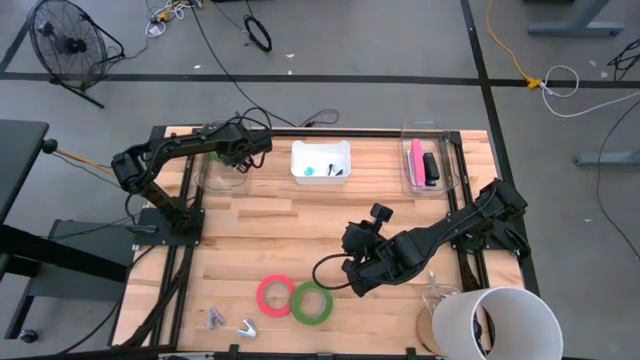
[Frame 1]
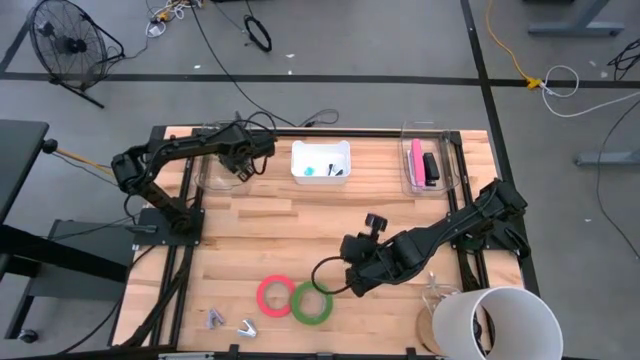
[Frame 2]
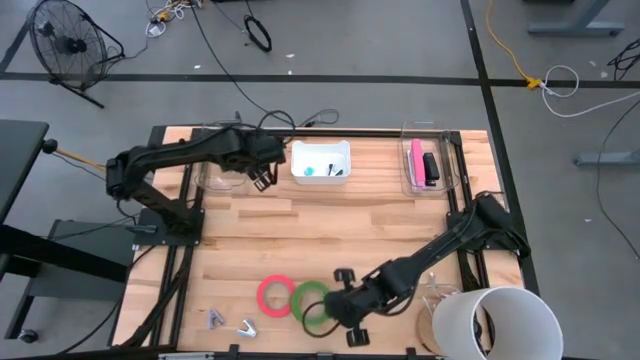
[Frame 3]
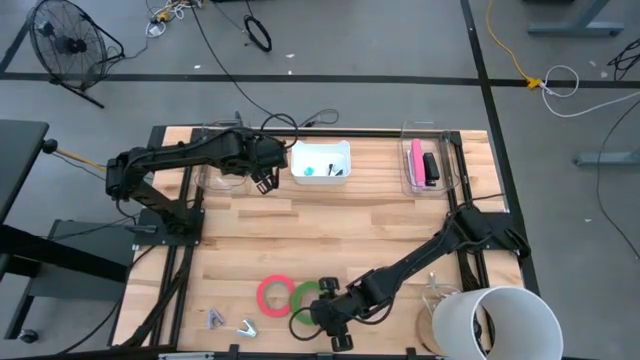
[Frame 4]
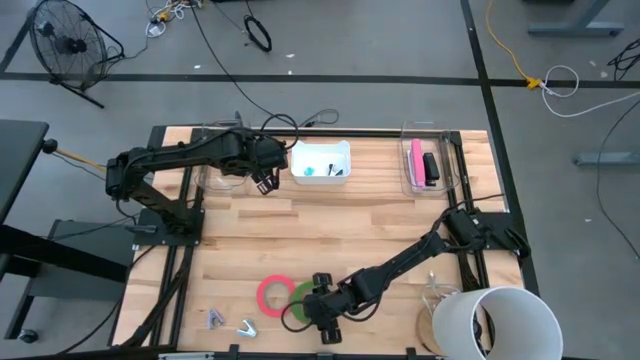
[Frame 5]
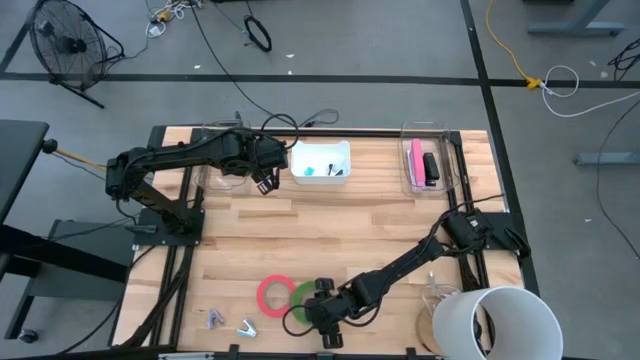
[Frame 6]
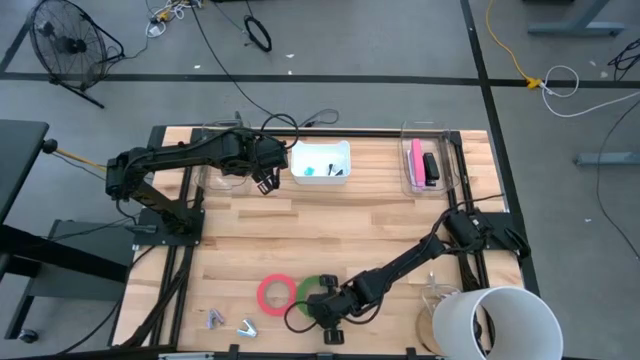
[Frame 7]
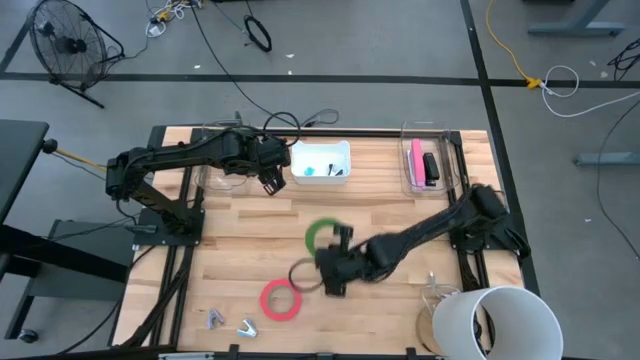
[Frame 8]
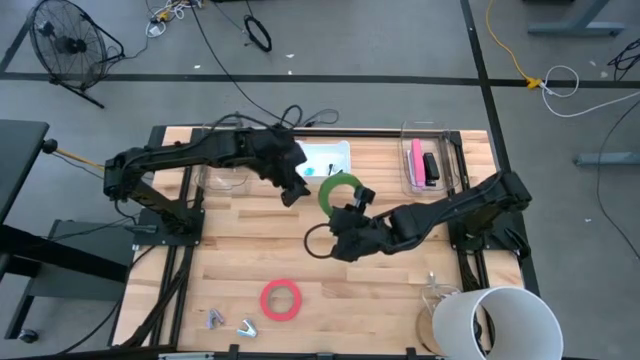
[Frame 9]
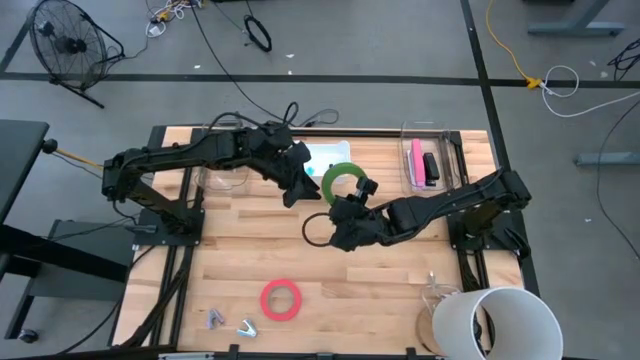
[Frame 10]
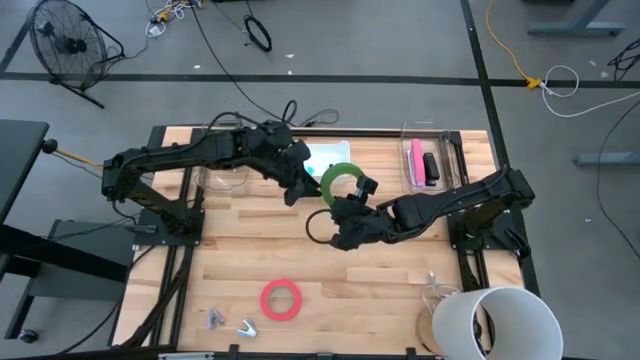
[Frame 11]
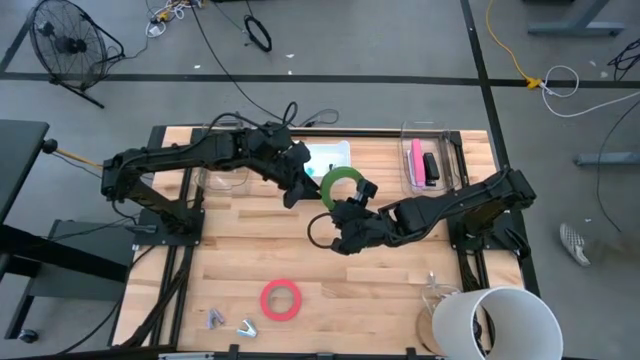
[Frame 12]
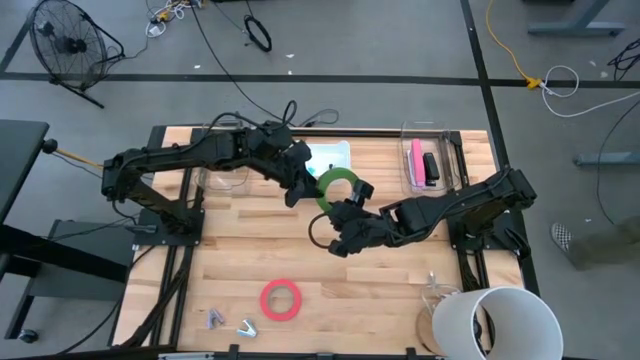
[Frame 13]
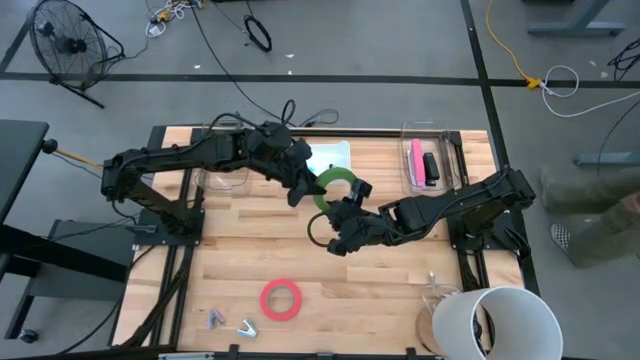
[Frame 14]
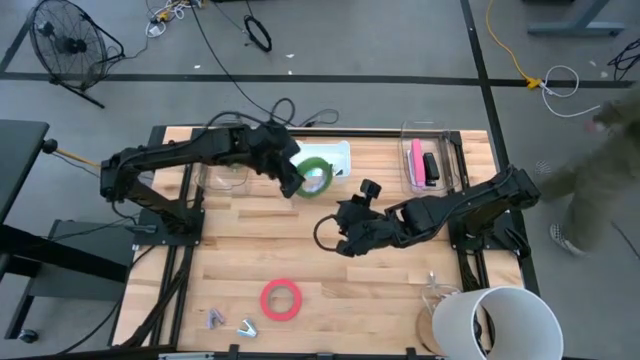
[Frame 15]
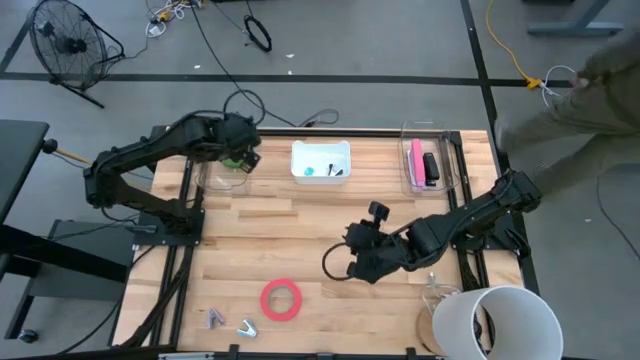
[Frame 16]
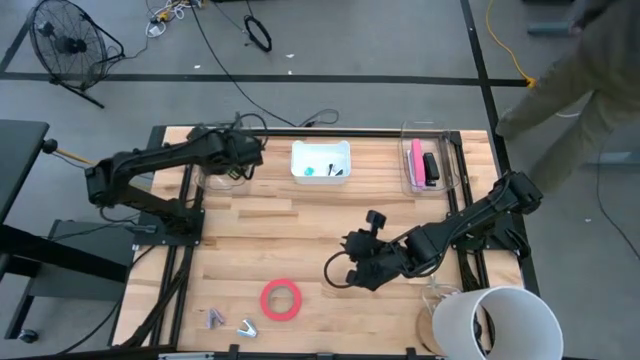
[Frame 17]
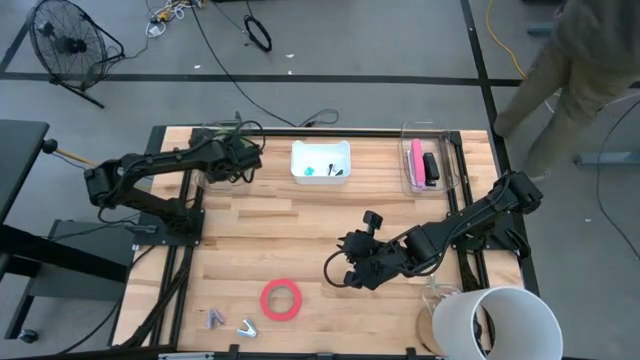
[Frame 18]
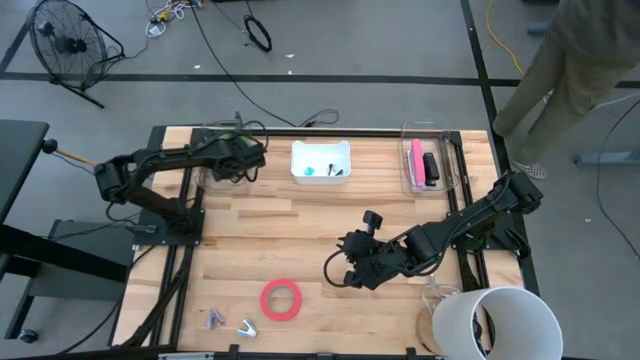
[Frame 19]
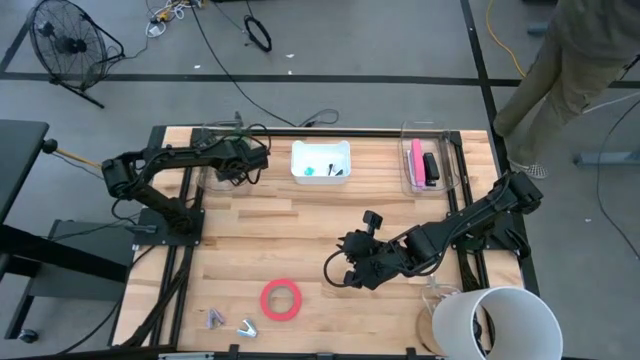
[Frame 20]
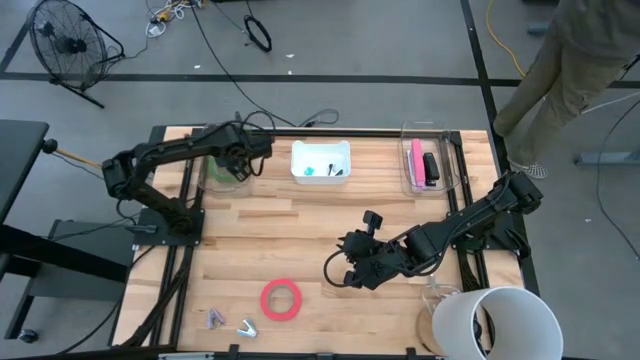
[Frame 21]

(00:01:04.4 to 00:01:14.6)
Task: Pick and place Stapler, Stapler remover, tape
Put the green tape into the left transparent bin

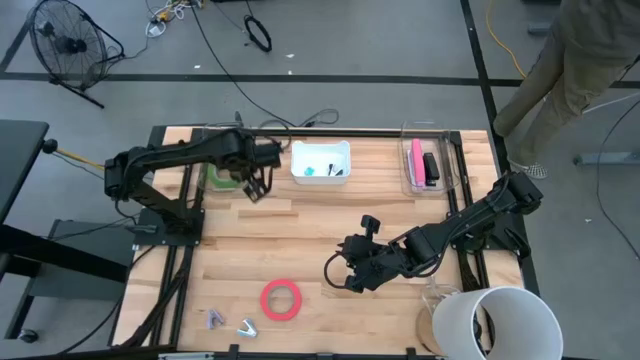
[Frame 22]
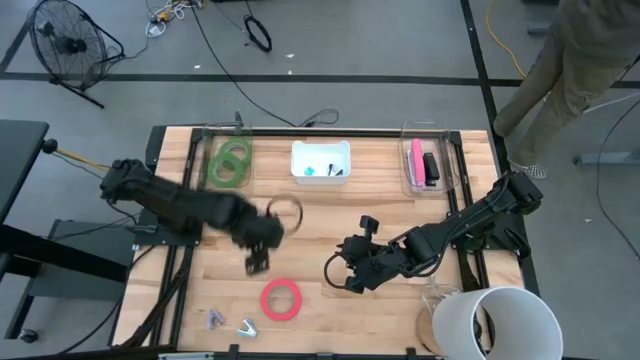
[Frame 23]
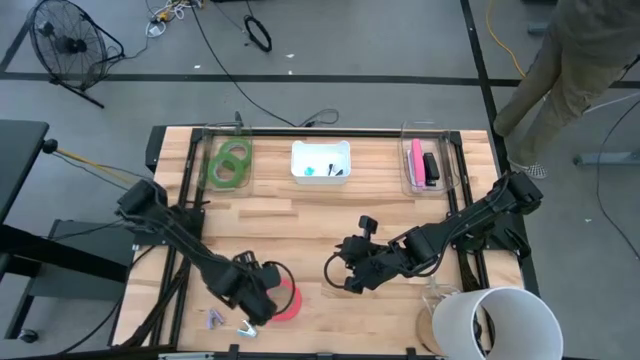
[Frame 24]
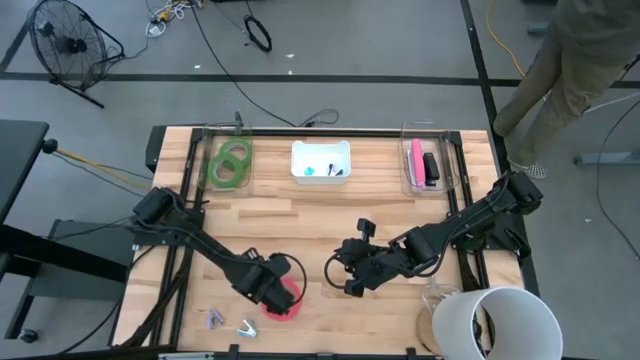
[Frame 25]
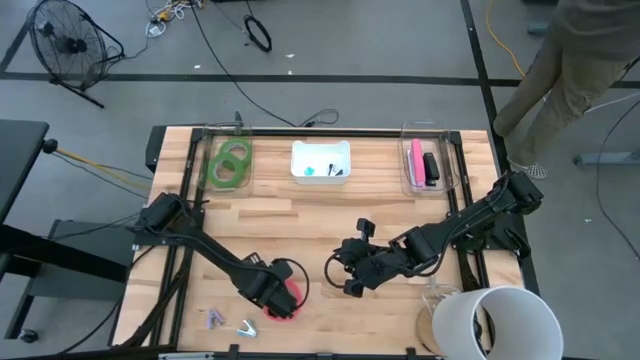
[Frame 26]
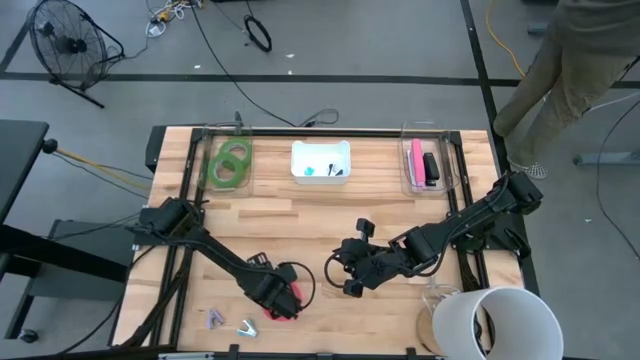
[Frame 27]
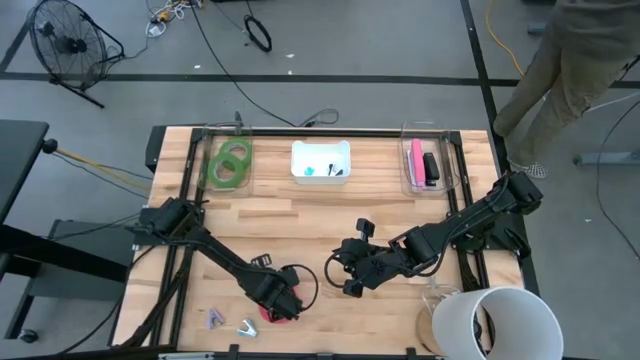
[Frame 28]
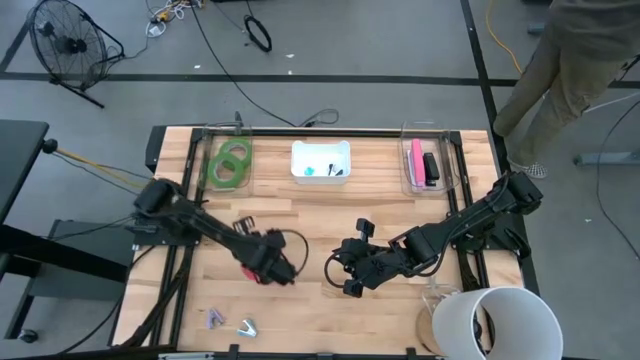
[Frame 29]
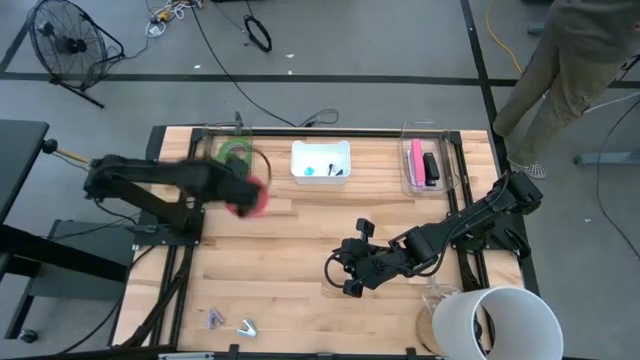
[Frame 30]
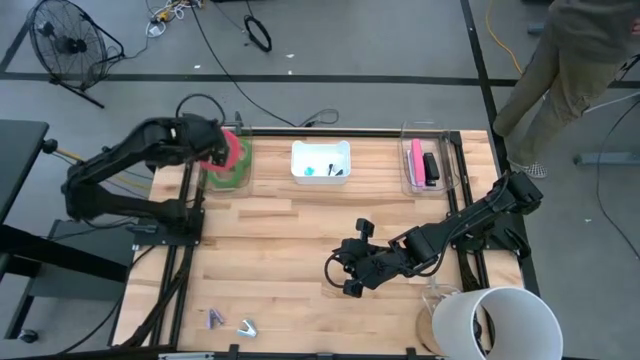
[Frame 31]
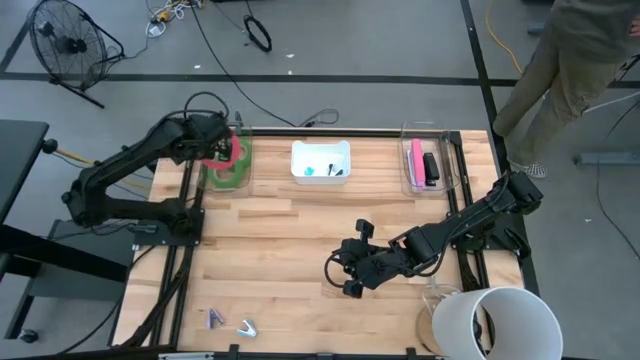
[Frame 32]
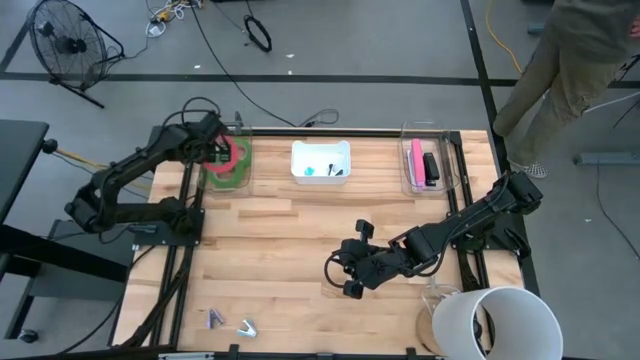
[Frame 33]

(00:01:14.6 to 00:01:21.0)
Put the pink tape into the left transparent bin

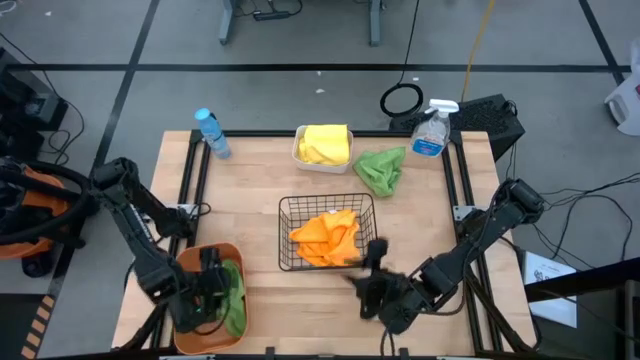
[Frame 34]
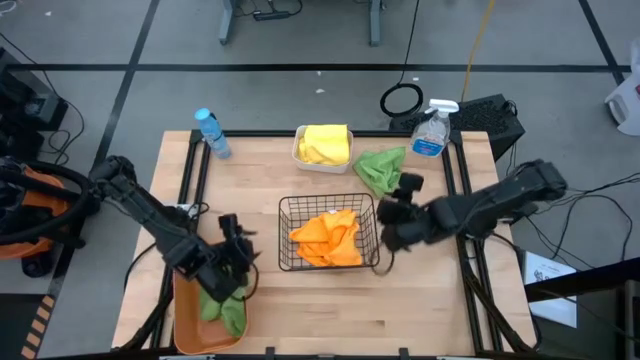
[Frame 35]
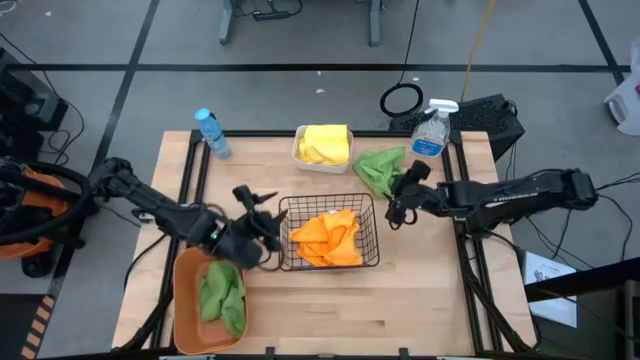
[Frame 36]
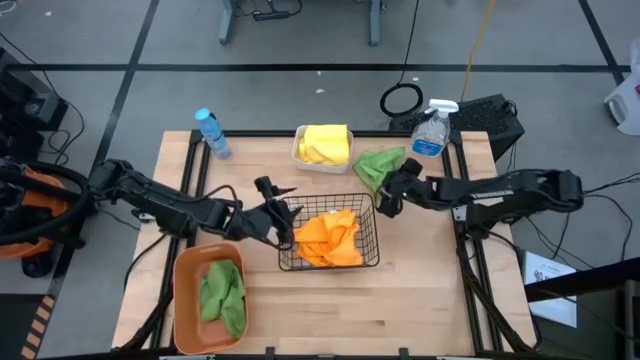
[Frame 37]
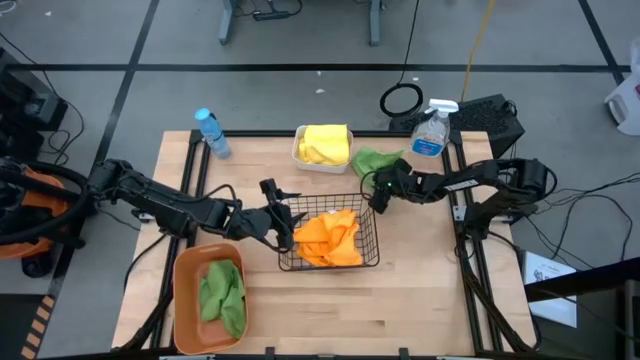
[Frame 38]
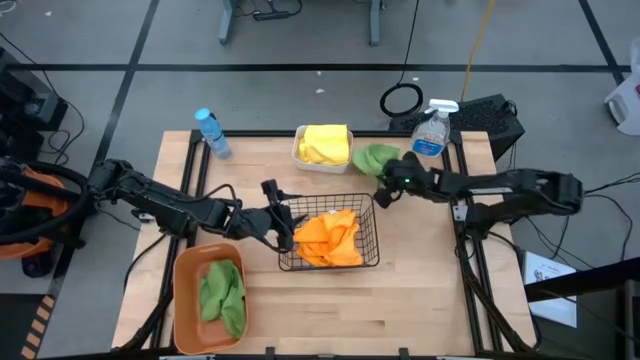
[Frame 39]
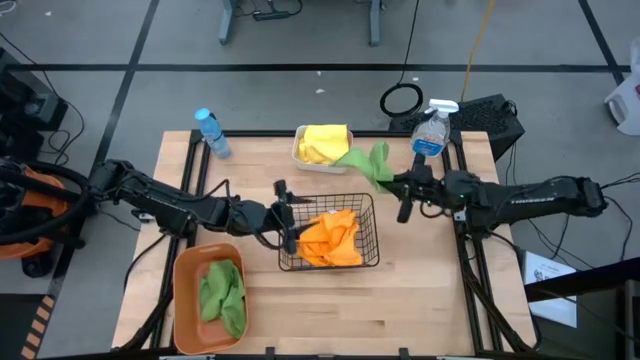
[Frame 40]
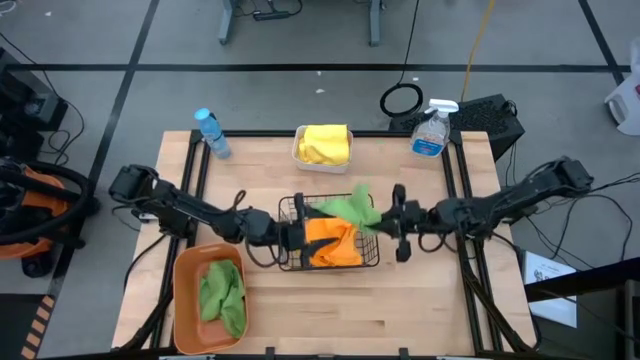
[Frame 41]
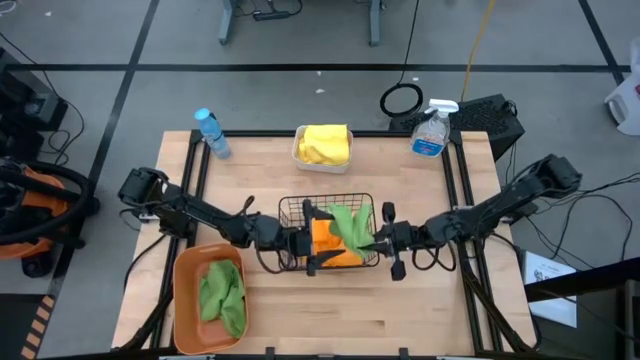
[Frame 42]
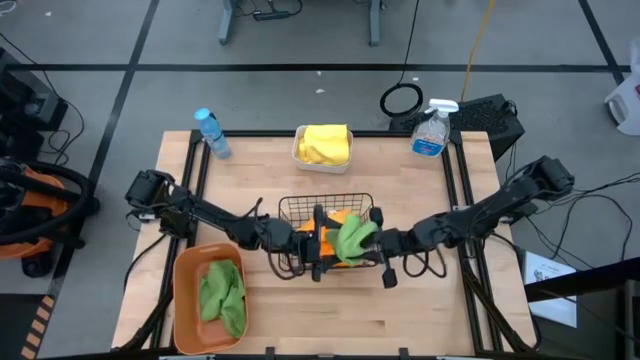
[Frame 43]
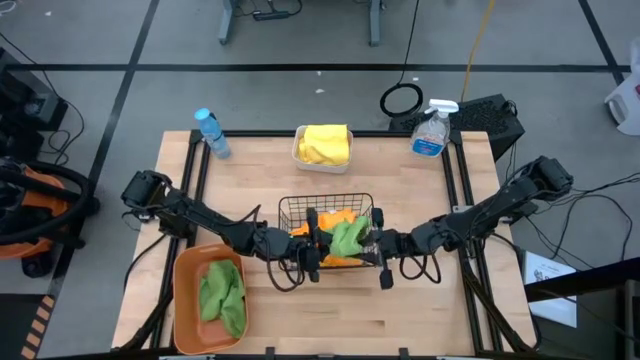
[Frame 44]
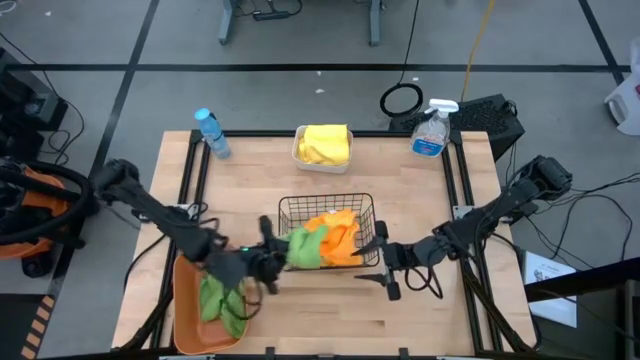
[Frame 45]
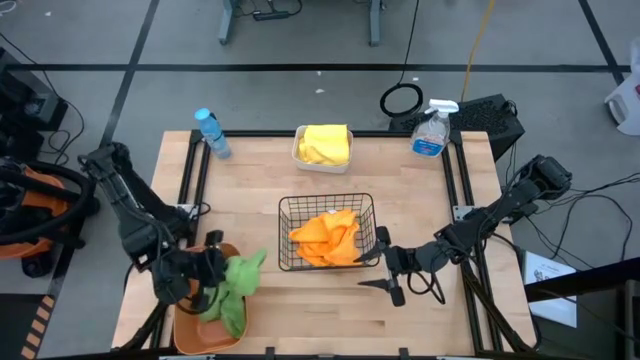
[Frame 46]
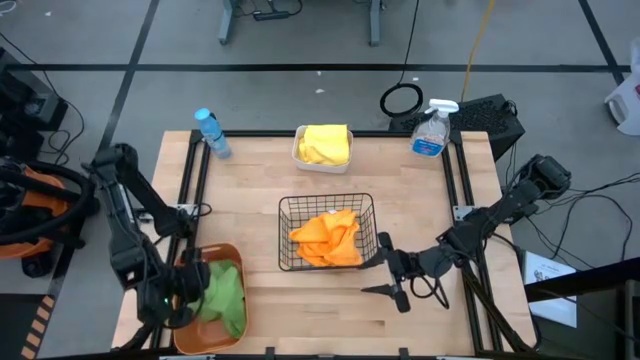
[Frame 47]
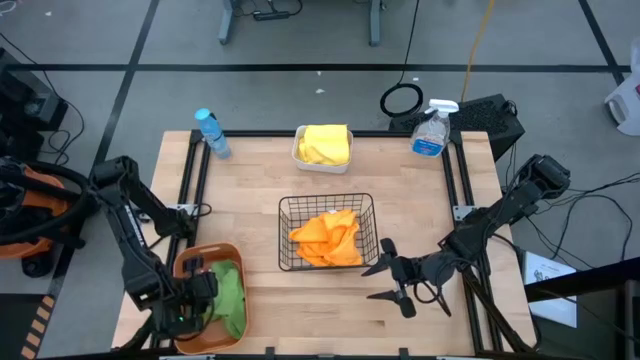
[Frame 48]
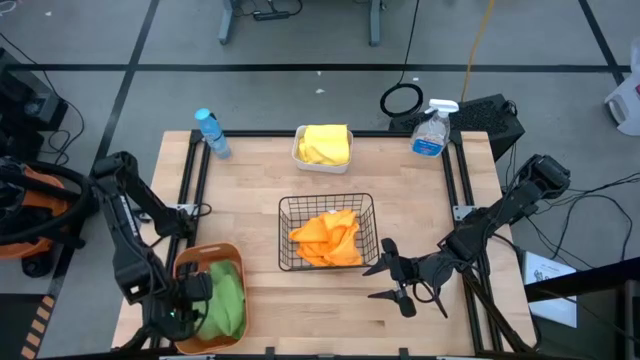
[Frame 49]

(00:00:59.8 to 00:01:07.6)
Task: Sort microfiber towel by color & place in baskets
Put the green microfiber cloth into the orange bin
